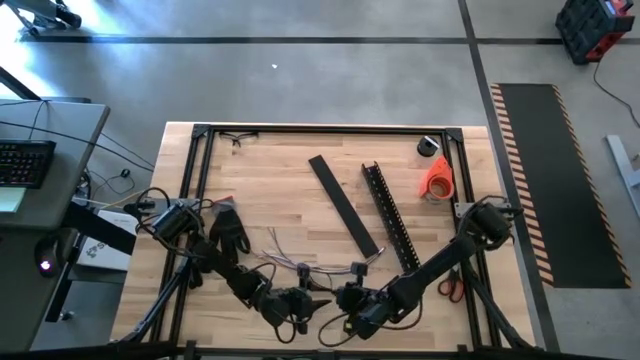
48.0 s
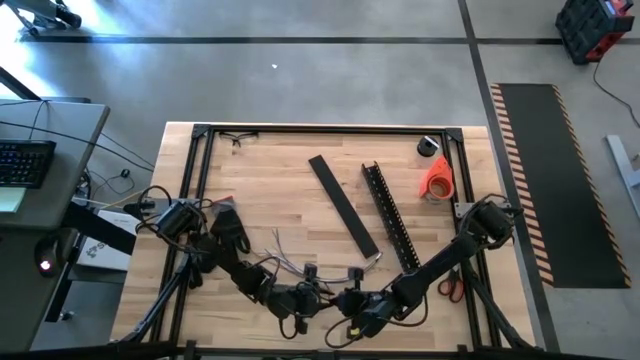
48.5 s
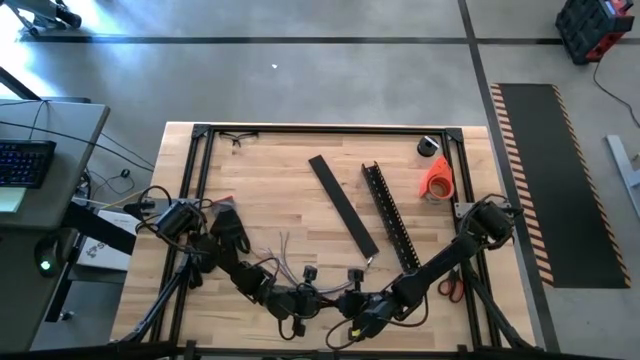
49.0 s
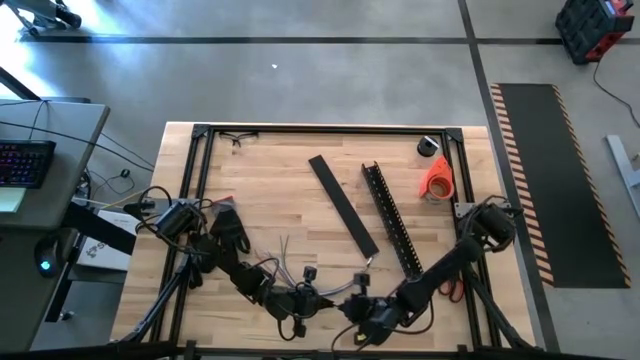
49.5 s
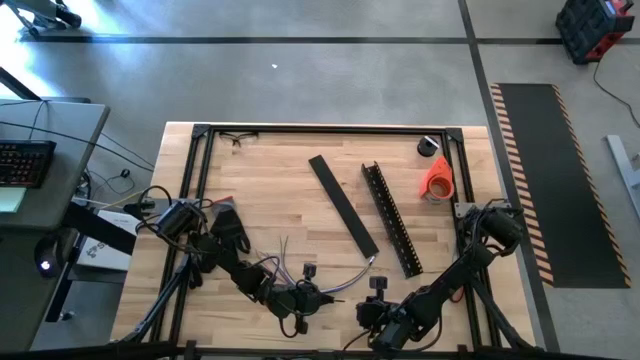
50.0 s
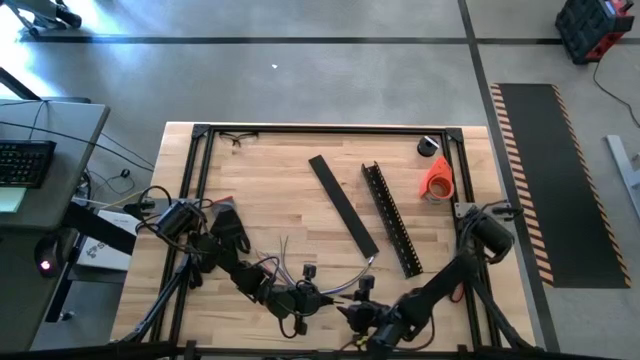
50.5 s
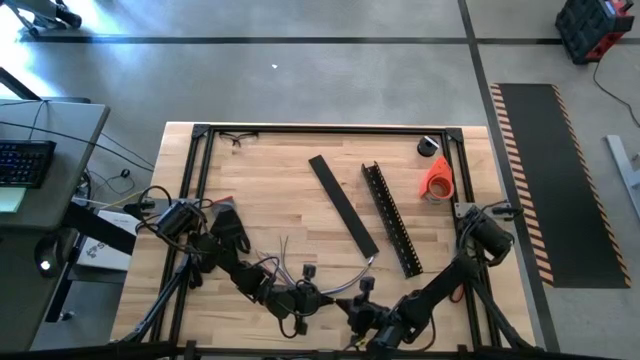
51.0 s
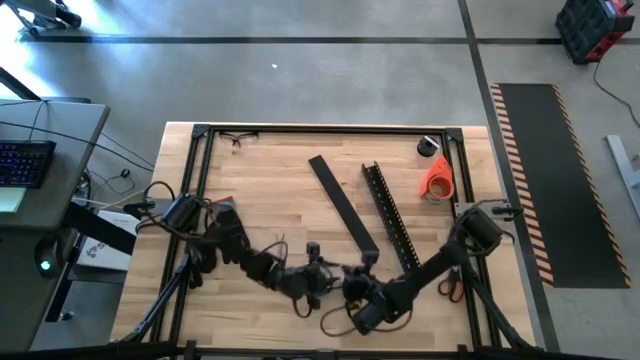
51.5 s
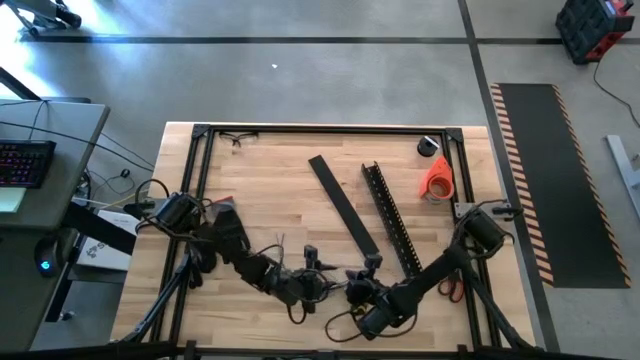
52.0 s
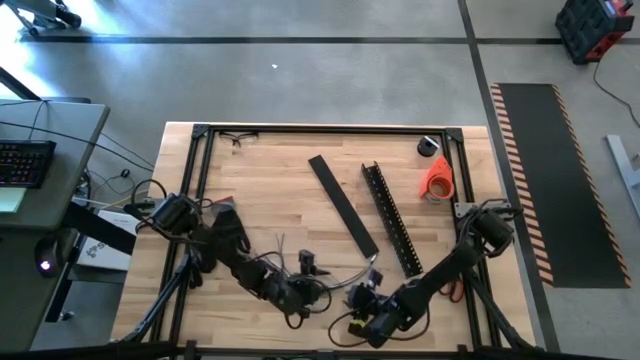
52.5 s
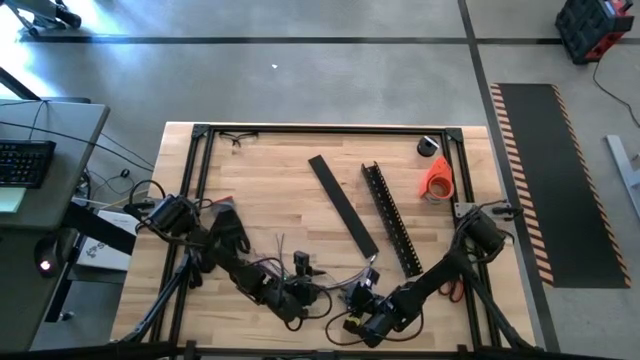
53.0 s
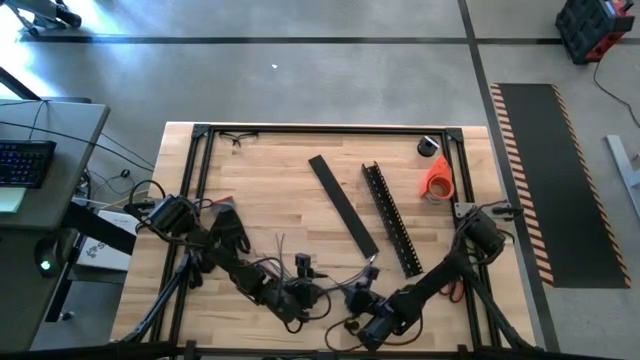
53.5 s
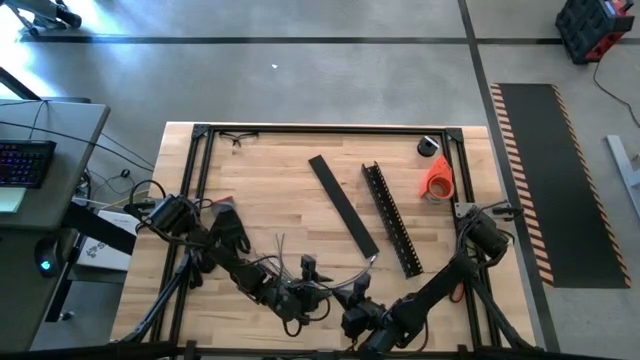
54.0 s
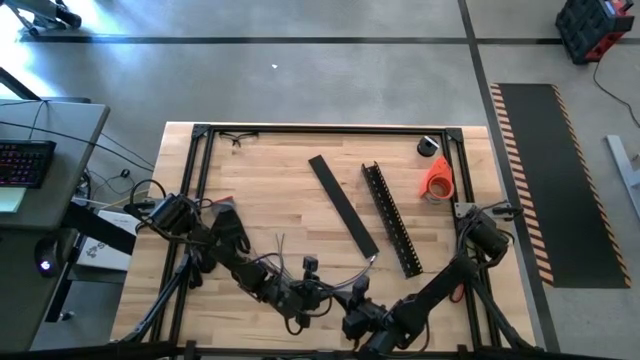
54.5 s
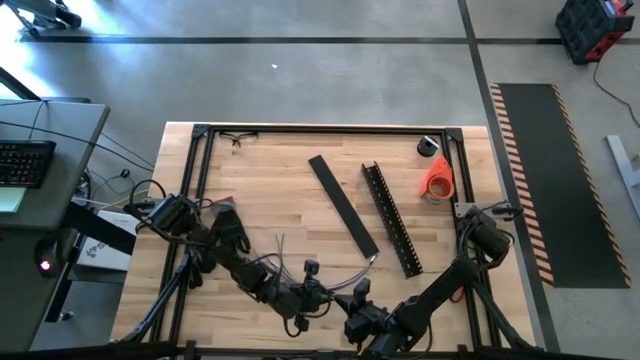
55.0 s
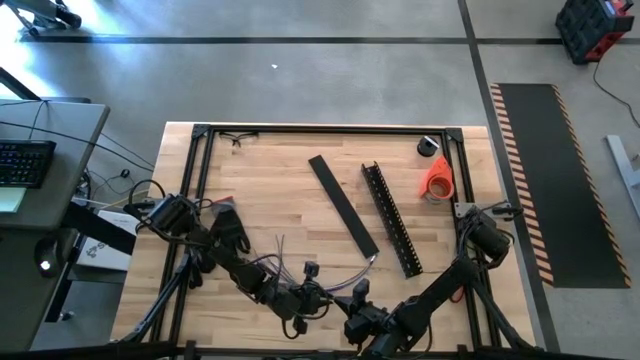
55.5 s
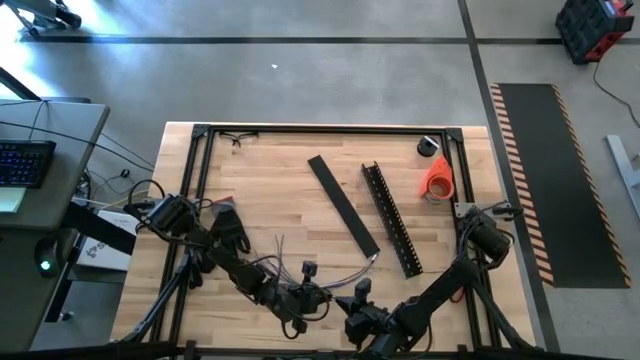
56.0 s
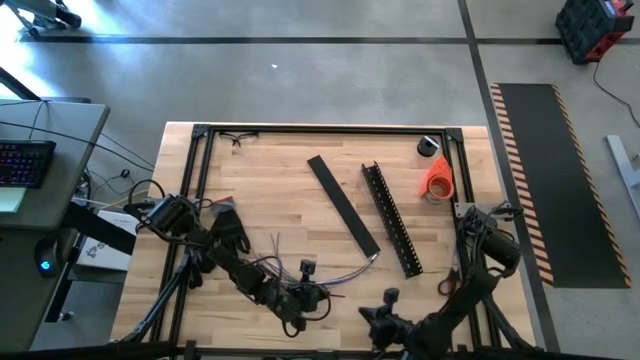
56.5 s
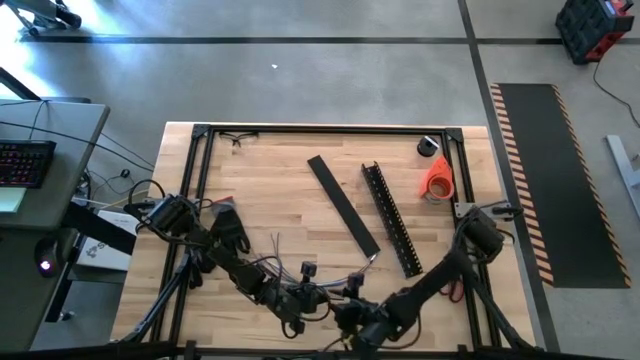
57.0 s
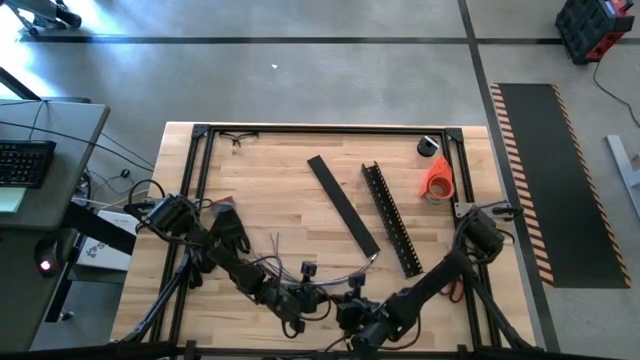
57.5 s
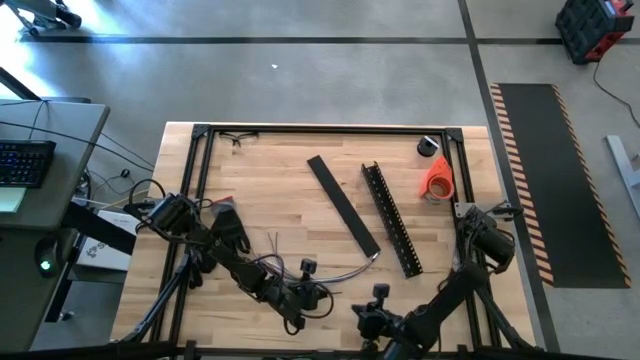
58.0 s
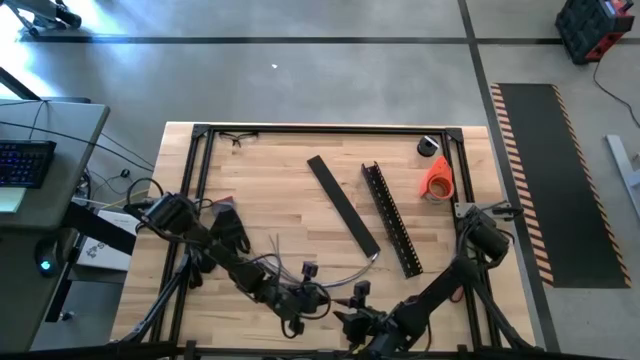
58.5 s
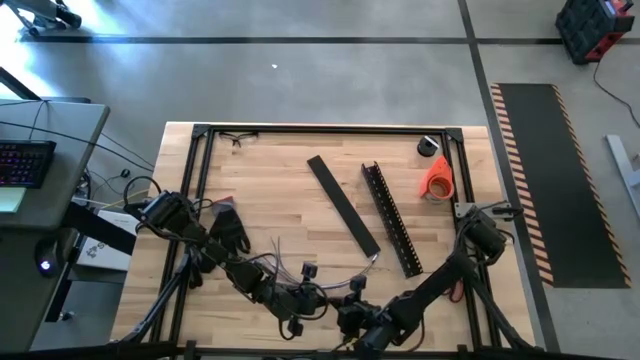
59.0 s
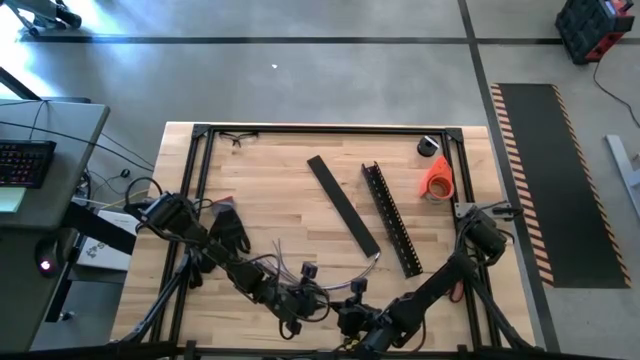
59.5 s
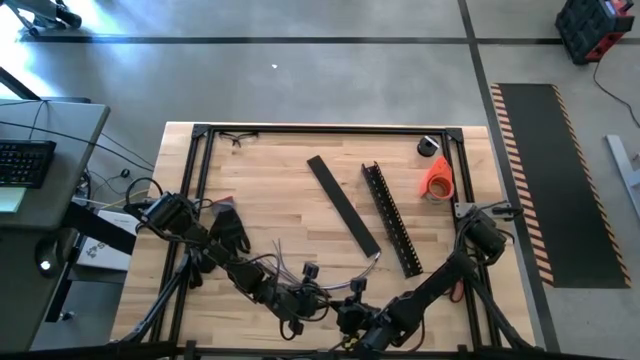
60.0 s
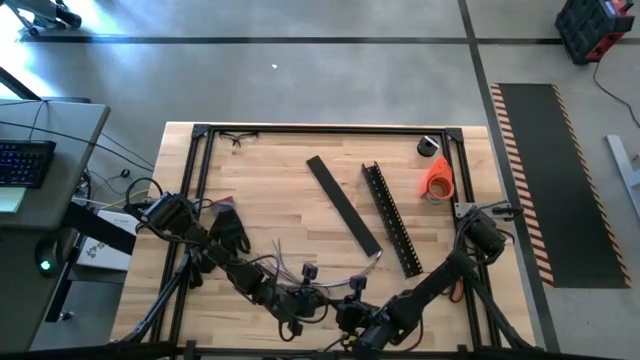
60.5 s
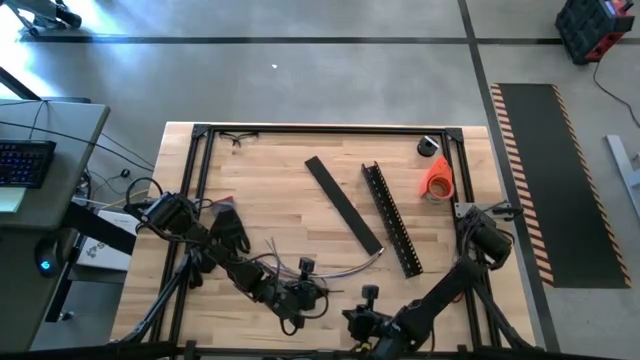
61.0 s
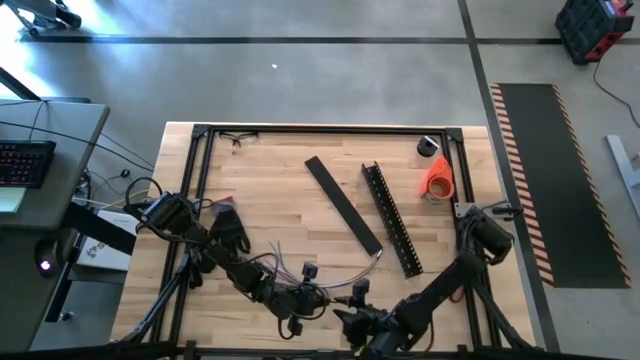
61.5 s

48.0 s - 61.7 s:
Task: Ziptie cables
Wrap the black zip tie on the cables

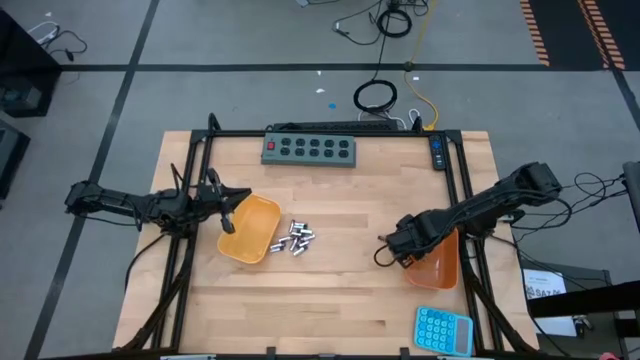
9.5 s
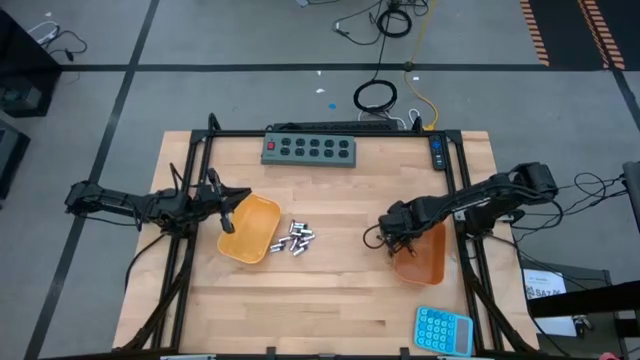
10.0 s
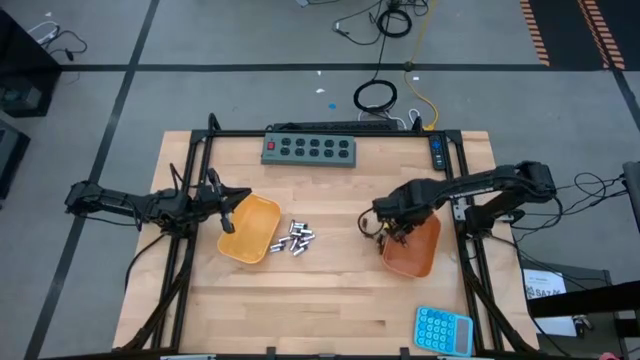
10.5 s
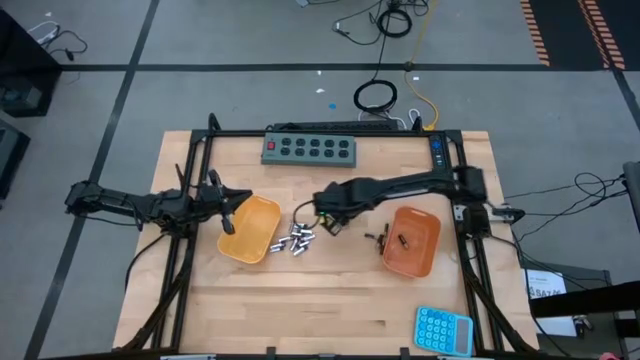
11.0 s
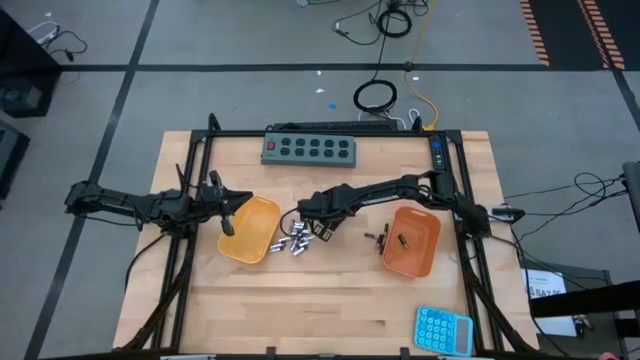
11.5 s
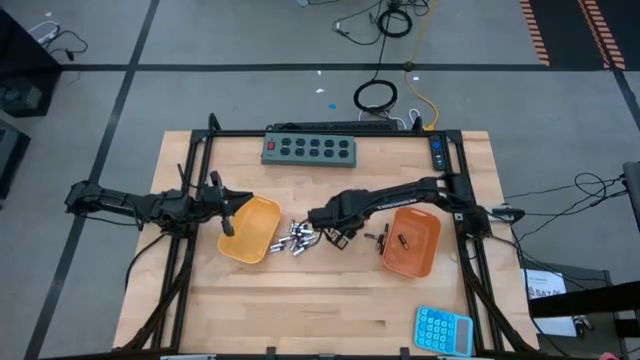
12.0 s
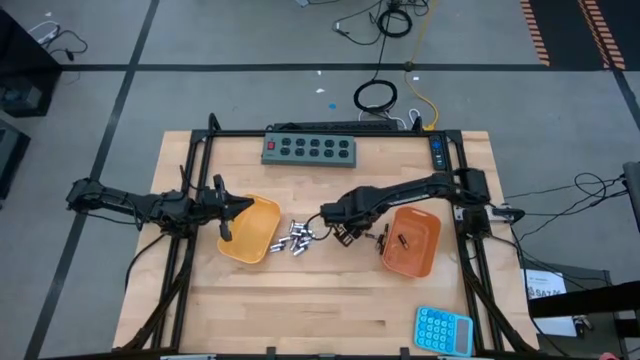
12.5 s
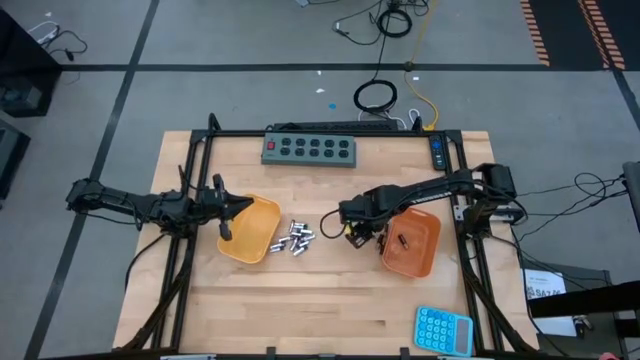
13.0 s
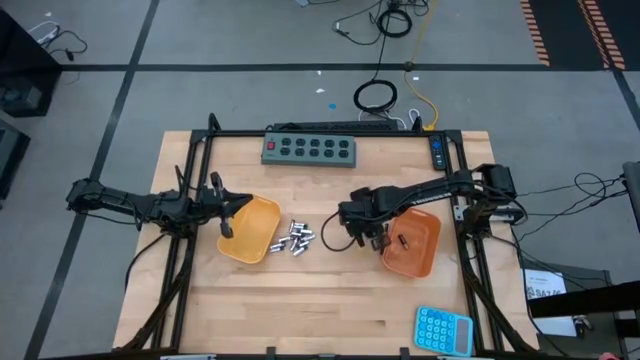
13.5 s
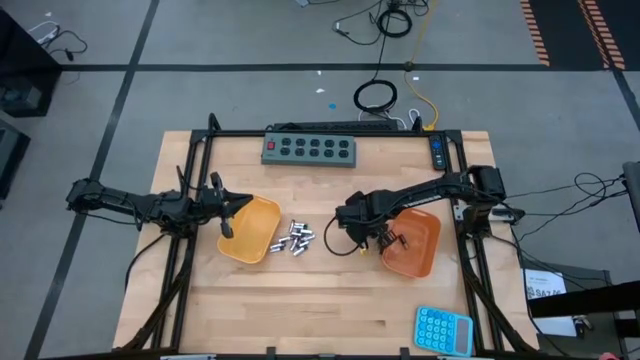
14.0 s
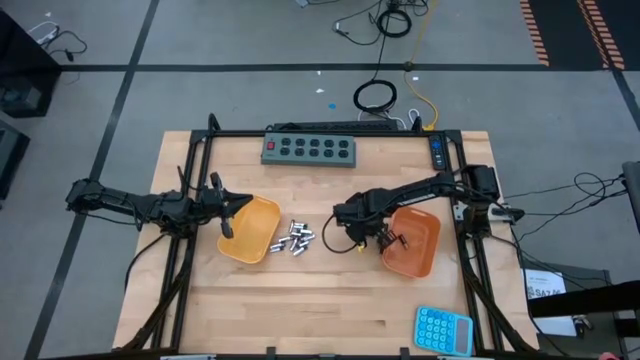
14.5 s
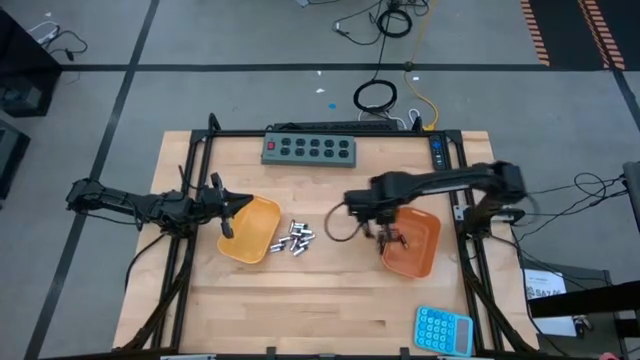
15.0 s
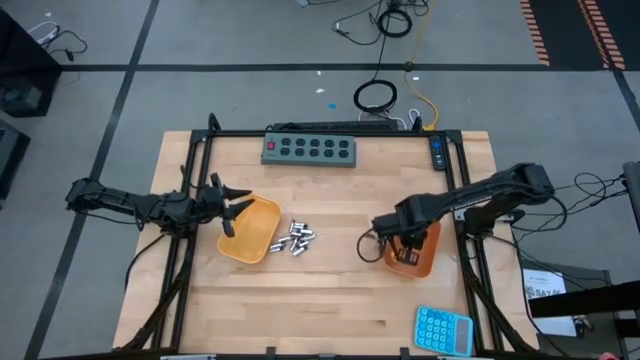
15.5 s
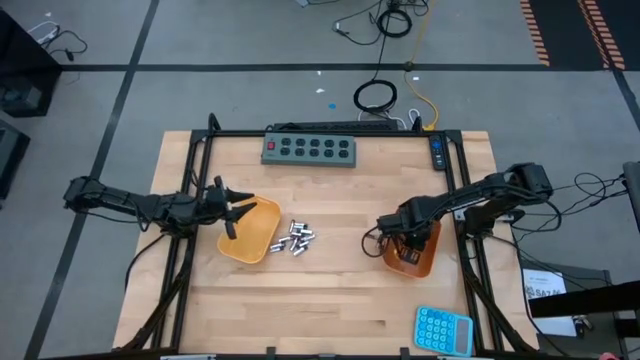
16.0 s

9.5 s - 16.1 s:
Task: Sort batteries
Put the black battery into the orange bin
